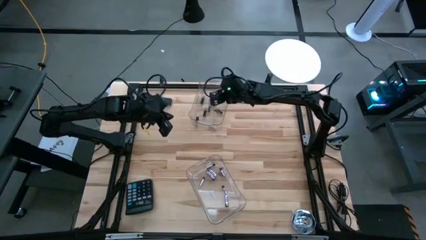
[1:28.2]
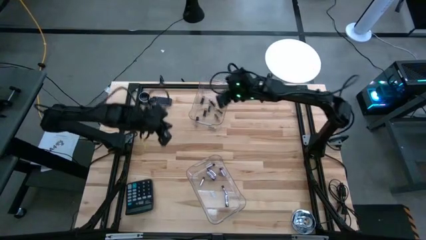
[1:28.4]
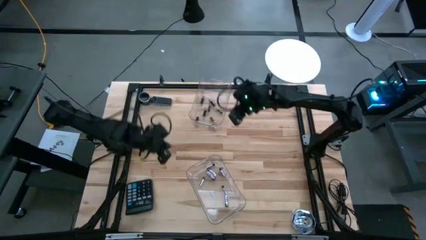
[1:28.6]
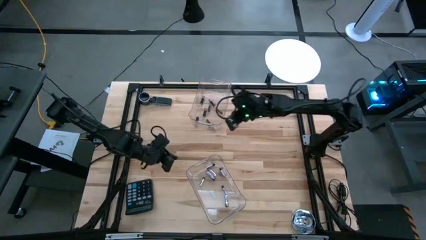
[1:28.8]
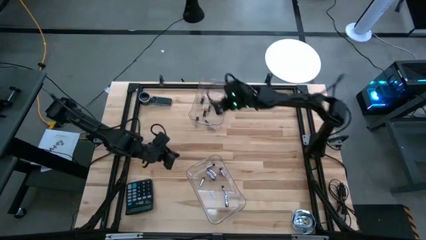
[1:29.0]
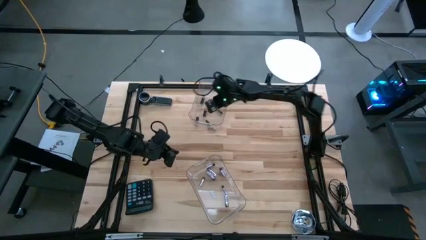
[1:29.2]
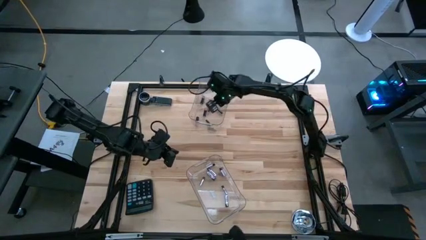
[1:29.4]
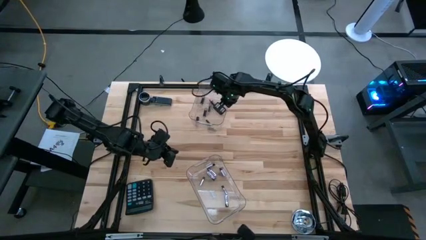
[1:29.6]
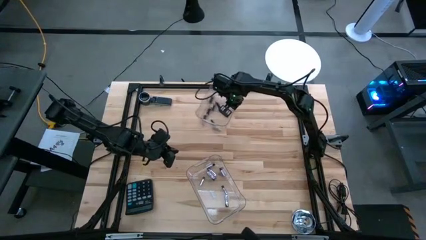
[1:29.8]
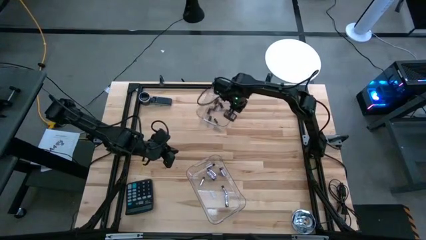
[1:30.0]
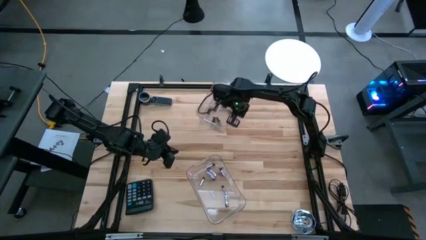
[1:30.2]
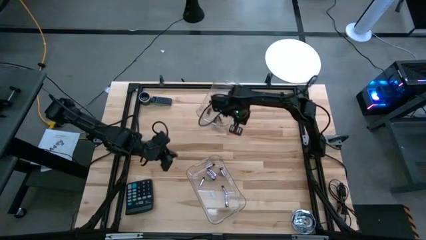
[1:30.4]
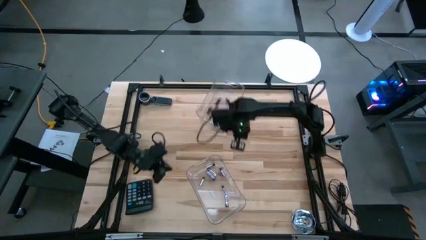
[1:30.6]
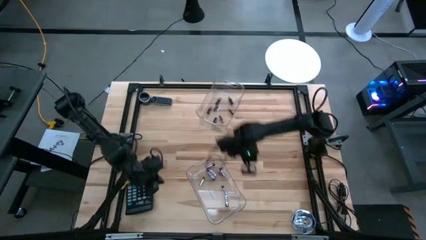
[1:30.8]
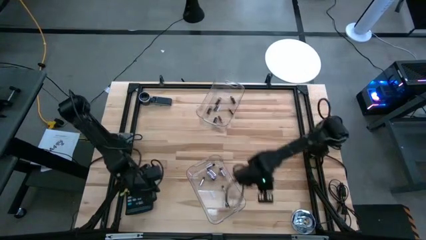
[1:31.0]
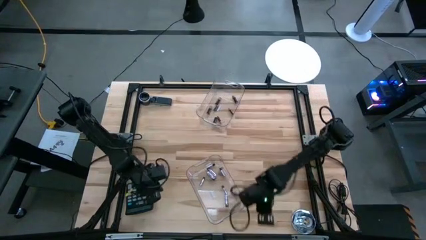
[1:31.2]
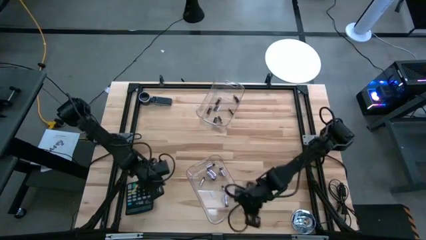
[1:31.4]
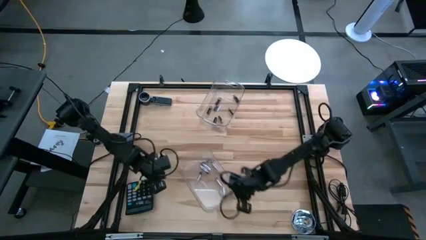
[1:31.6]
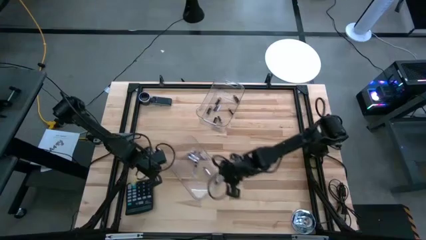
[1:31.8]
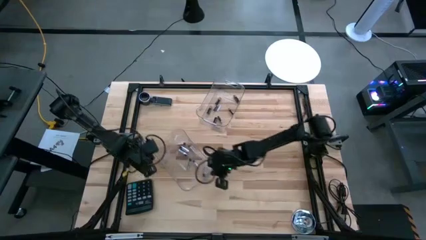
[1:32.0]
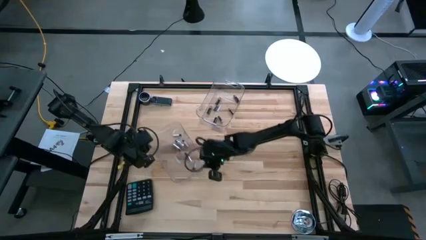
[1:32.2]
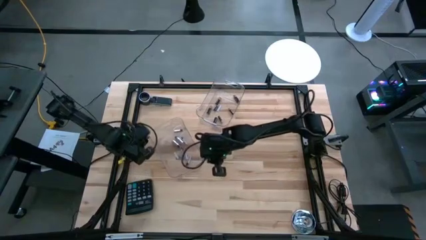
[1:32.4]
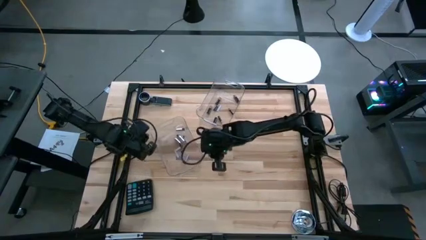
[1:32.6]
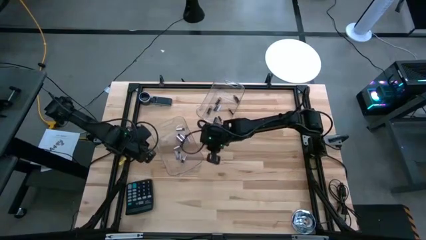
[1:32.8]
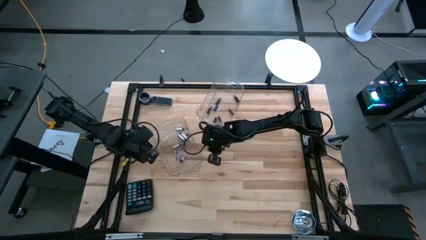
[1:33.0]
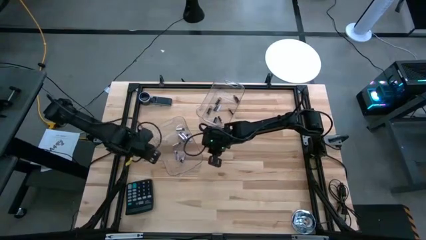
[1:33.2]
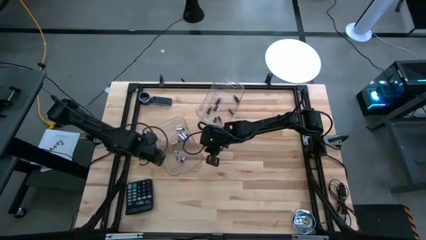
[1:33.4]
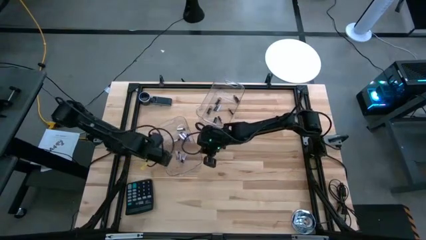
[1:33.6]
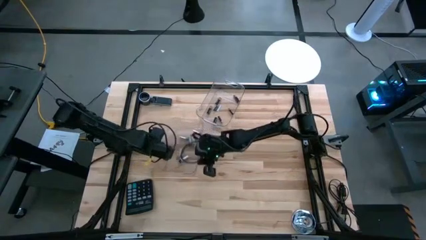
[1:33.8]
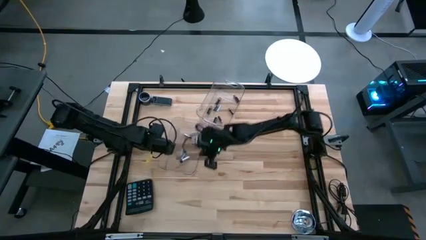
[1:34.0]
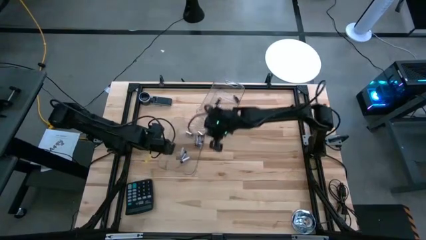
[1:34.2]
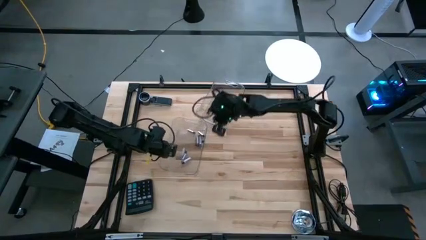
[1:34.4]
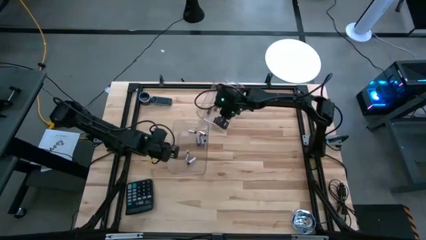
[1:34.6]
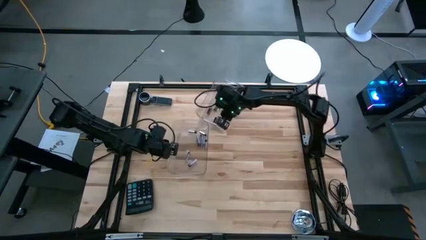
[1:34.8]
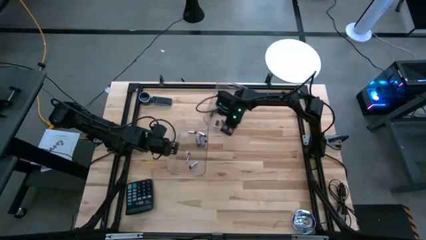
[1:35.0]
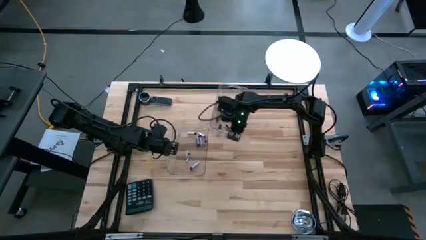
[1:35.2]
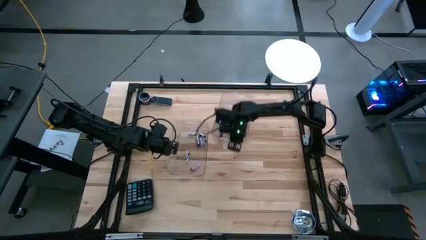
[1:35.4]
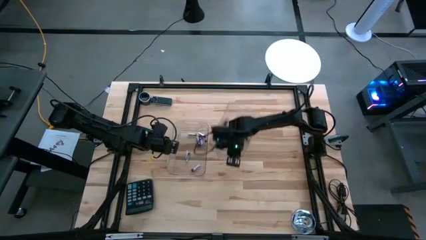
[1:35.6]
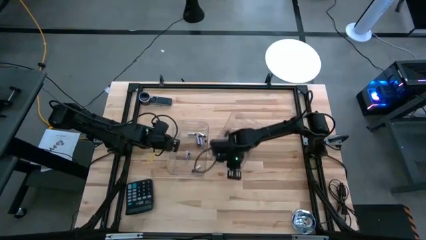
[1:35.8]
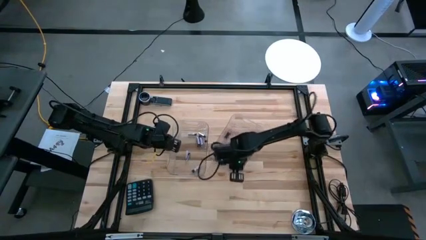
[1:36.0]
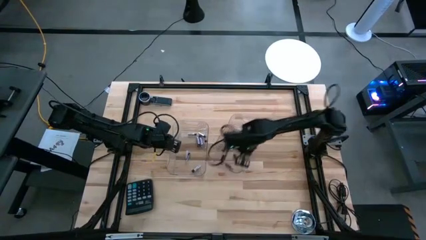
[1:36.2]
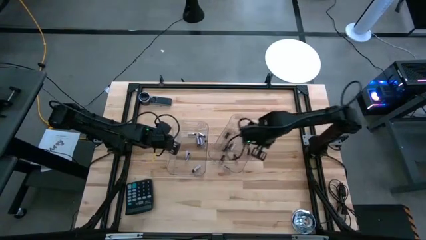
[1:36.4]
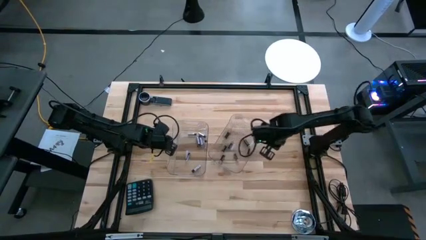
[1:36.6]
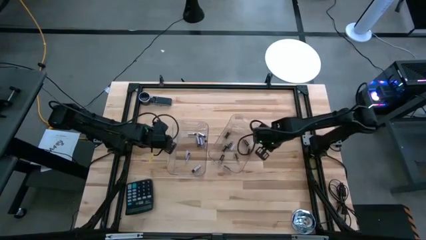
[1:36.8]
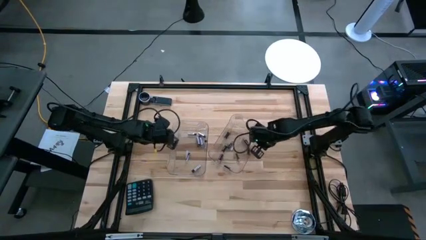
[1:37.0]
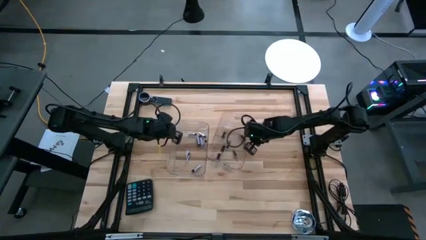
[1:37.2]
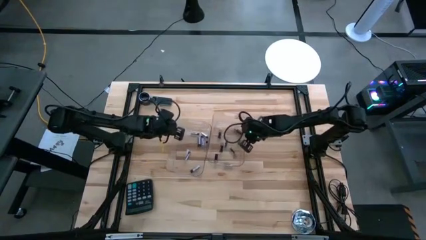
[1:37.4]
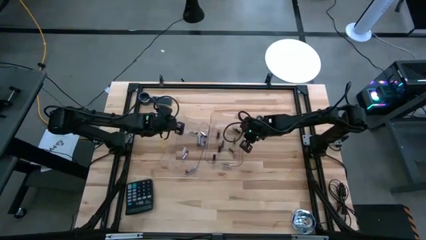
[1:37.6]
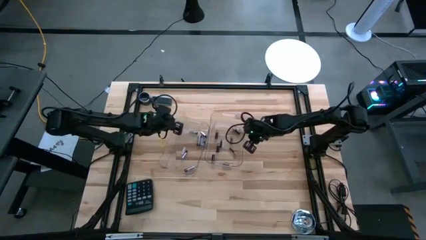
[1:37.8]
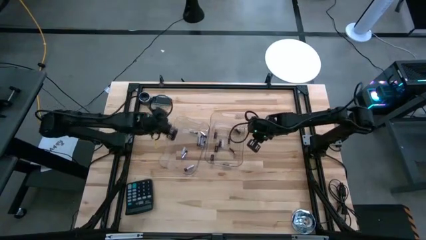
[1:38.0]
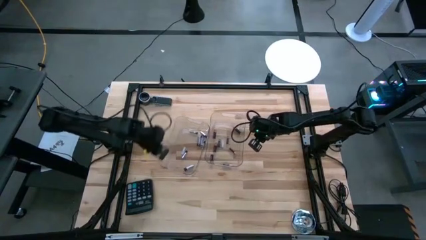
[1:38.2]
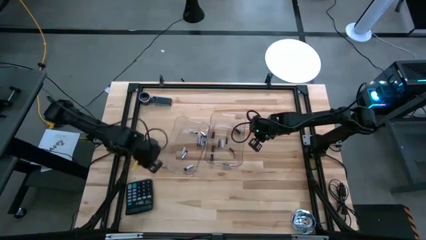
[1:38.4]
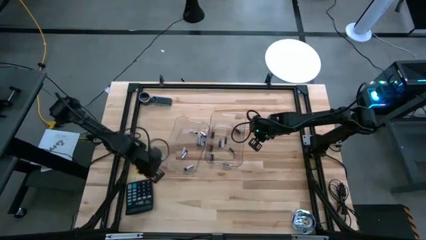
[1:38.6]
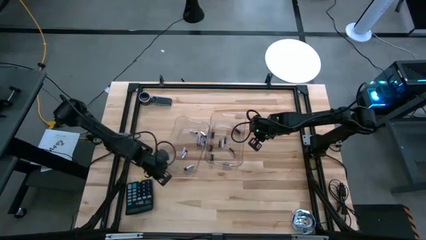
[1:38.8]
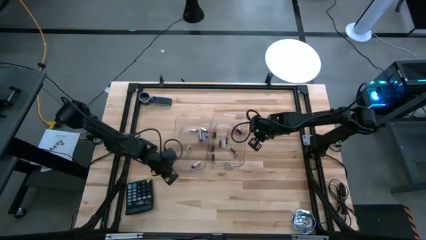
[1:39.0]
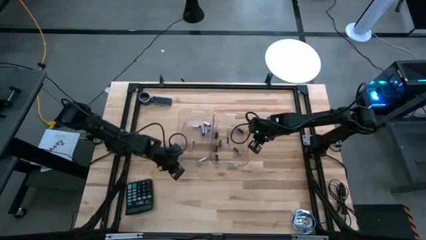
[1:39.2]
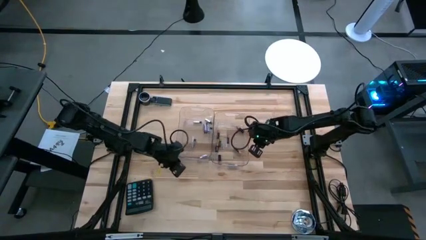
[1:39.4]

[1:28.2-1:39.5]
Task: Sort batteries
Move the transparent bins to the center of the table

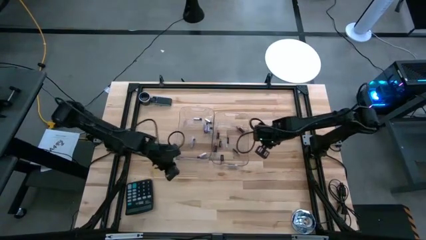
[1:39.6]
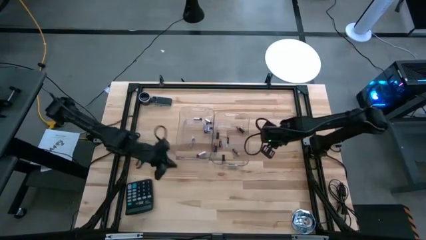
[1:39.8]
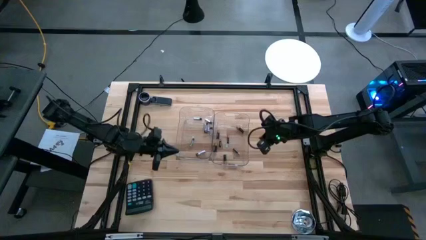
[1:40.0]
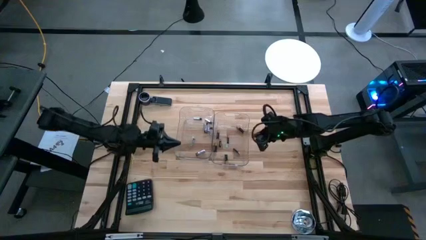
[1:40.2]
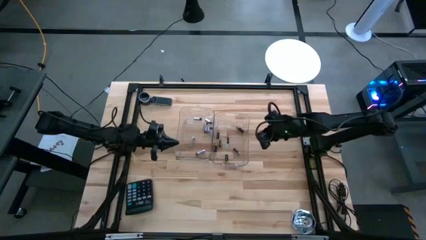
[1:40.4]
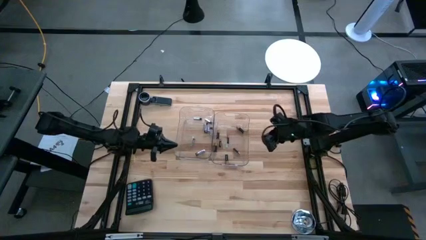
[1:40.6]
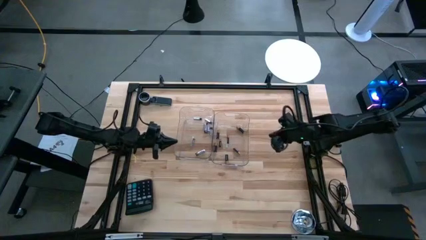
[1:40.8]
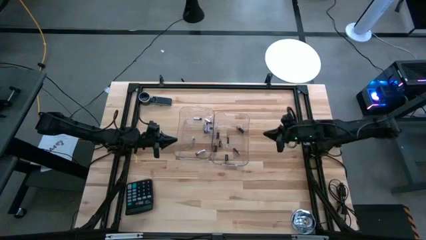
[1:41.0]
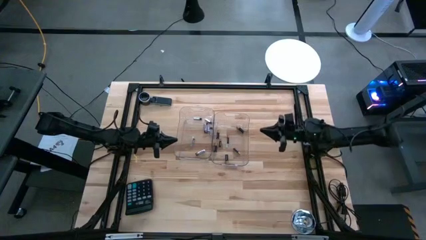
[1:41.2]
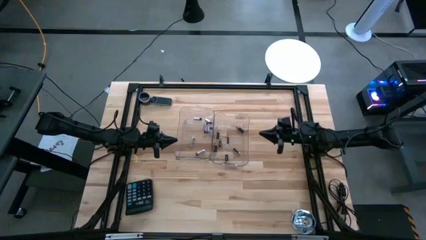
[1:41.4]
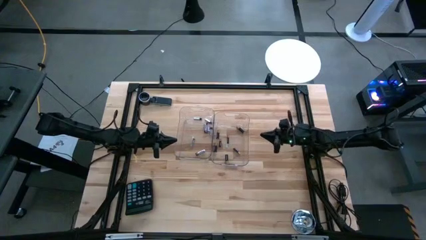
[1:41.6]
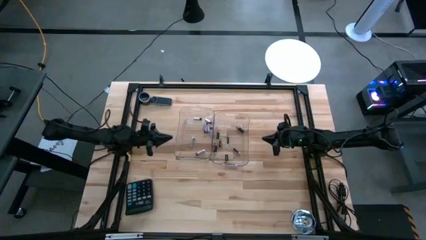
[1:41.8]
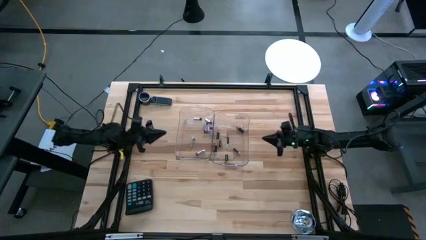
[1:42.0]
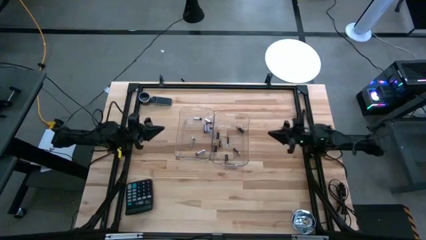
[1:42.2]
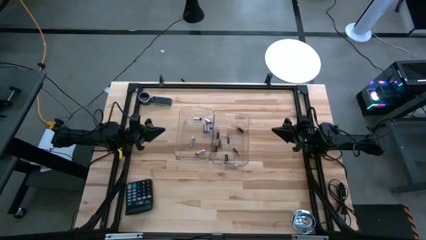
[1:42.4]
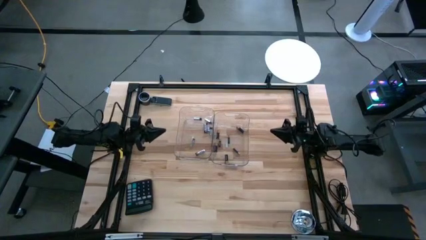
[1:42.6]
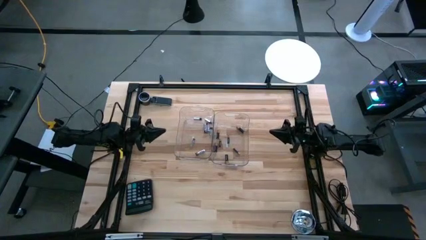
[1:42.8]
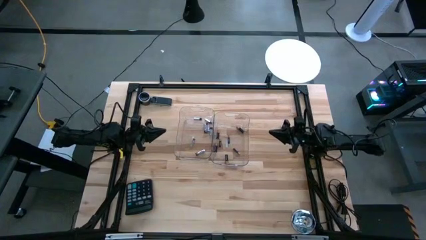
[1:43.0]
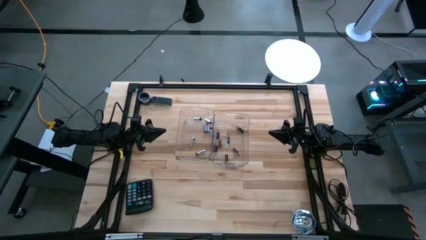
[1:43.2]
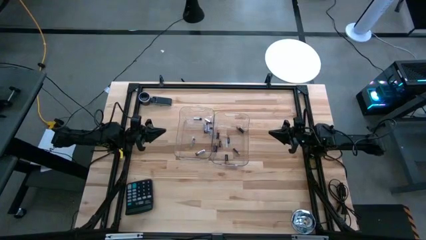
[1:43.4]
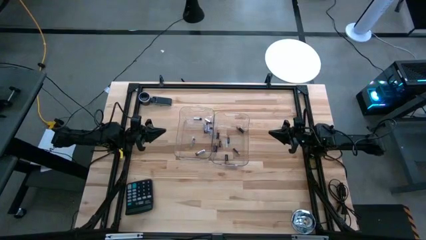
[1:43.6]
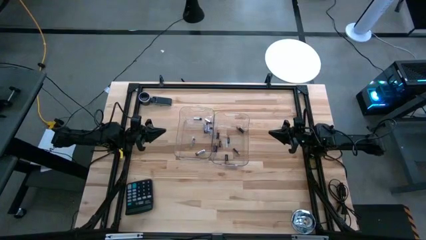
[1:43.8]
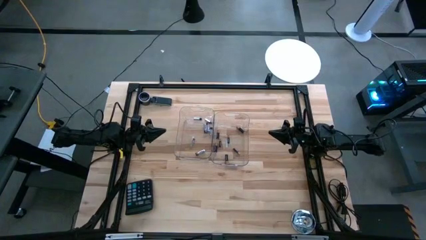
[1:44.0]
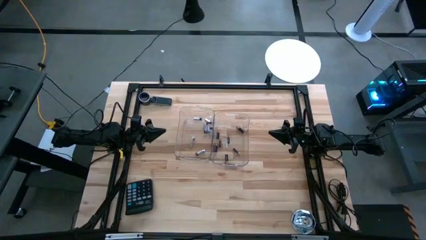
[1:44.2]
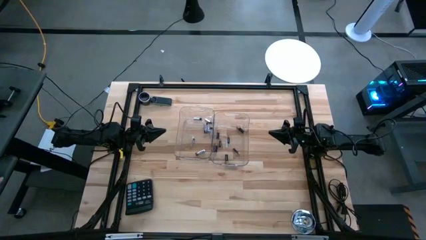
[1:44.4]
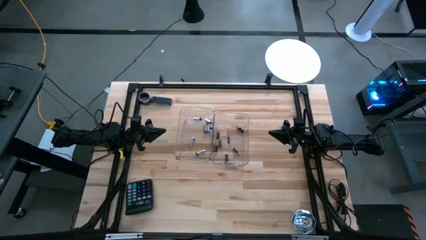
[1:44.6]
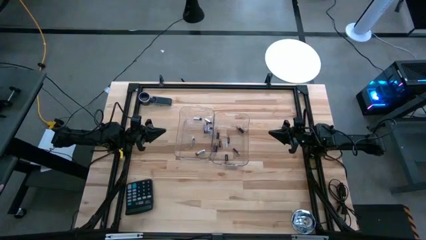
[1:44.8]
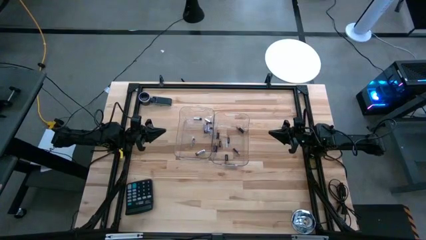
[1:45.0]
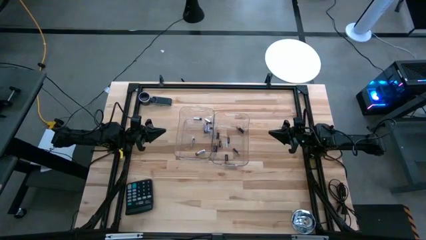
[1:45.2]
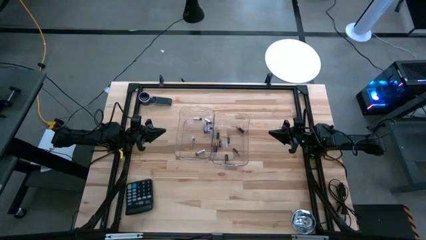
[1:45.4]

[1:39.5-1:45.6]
Return to Home Position
